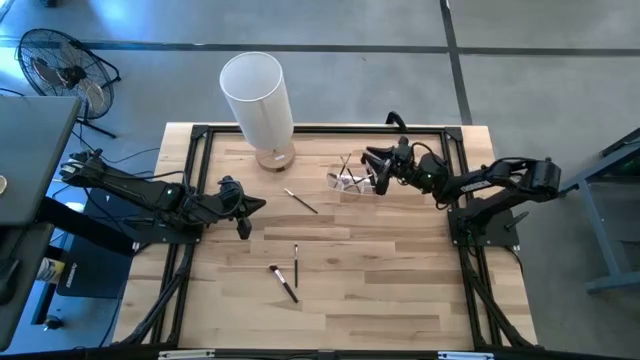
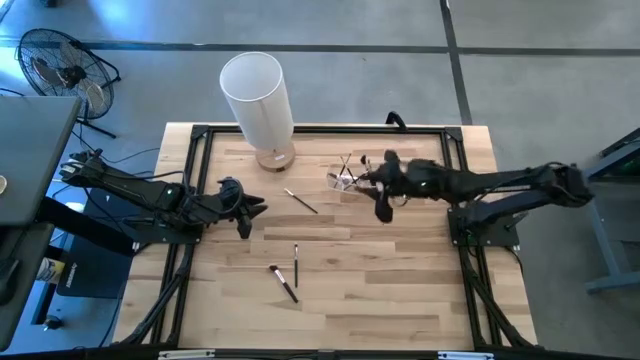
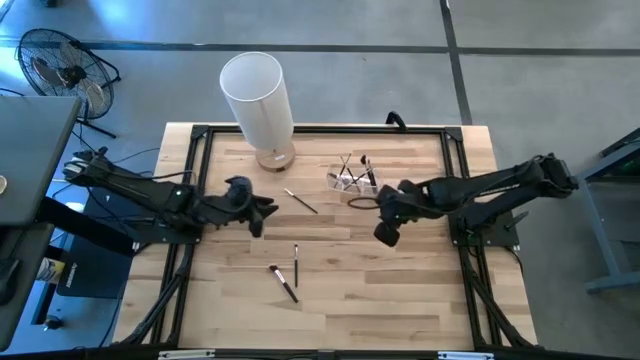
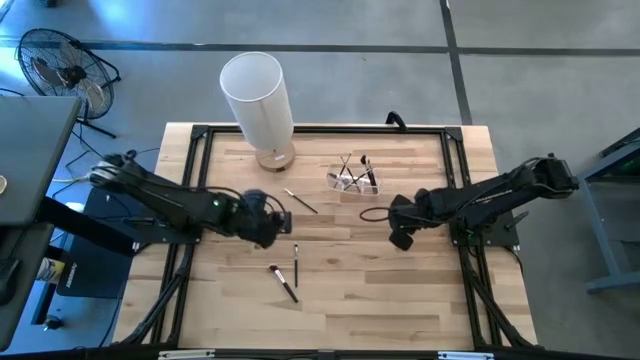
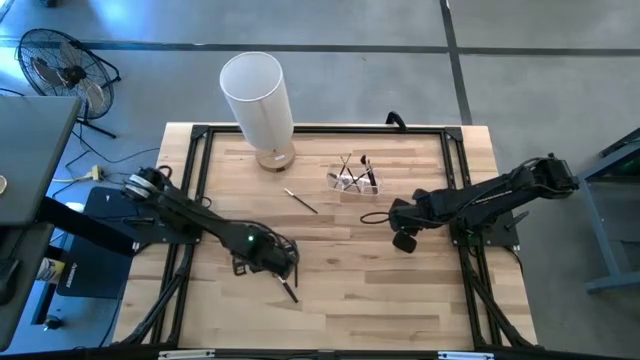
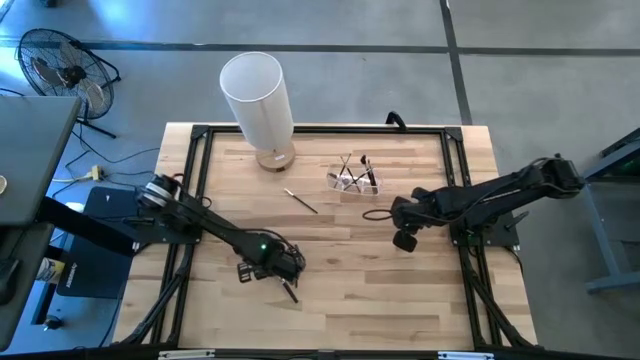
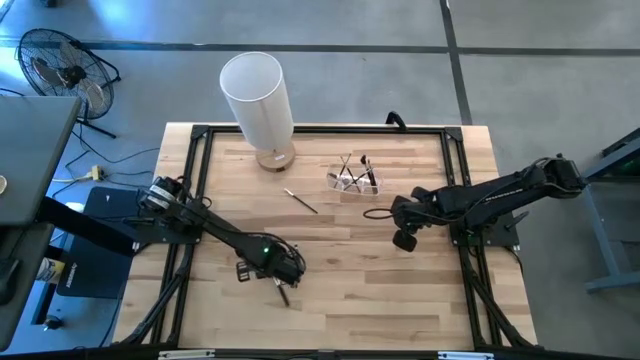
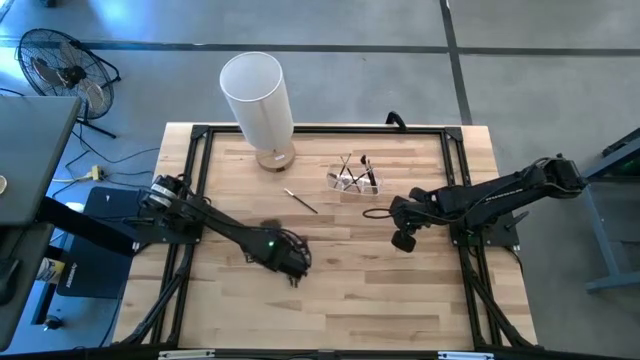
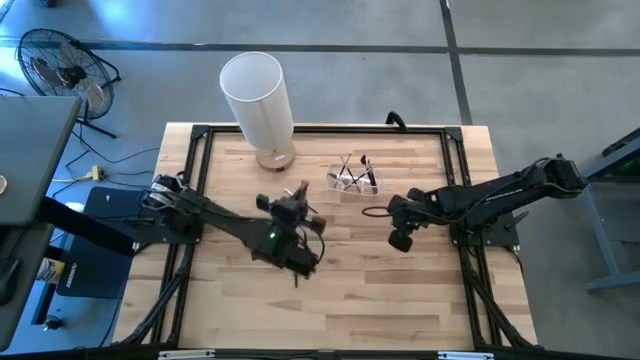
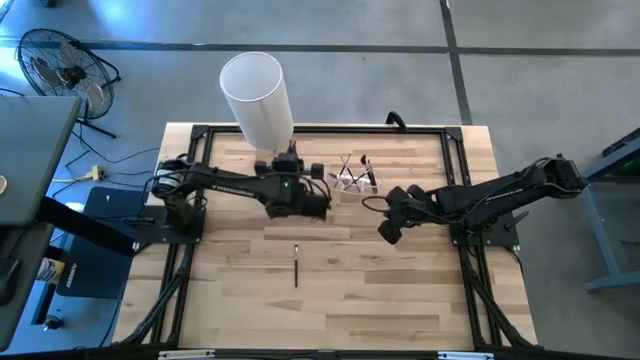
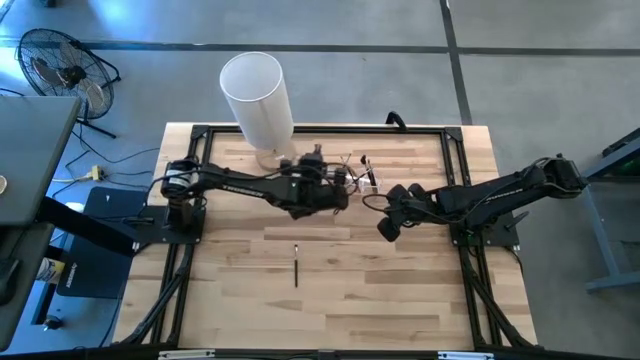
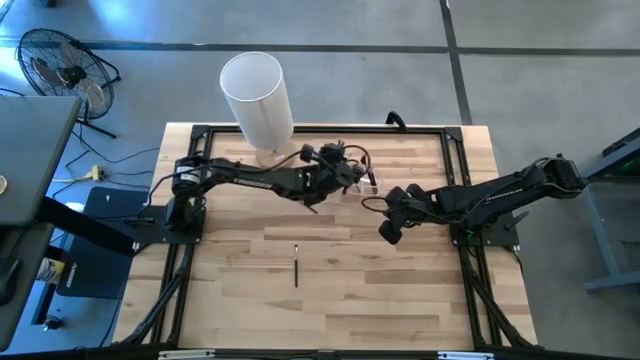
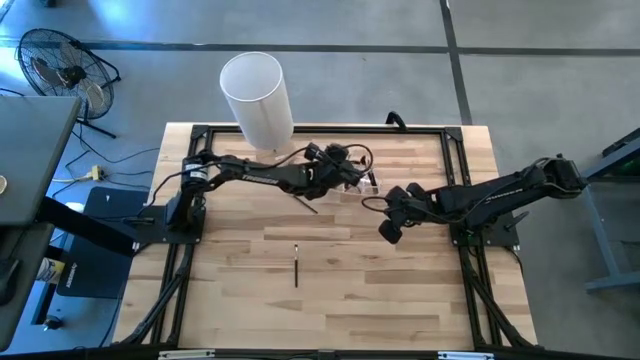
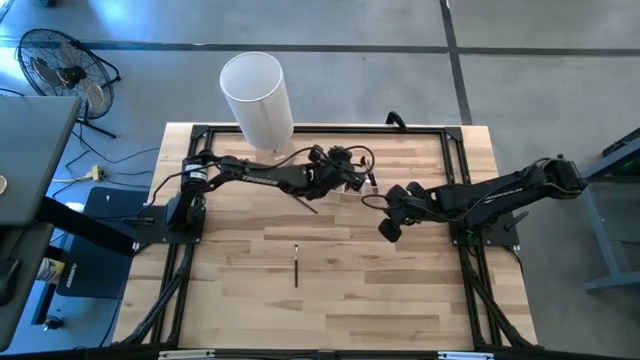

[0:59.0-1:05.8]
Task: Put items in baskets/containers
Put the black powder brush into the transparent organizer

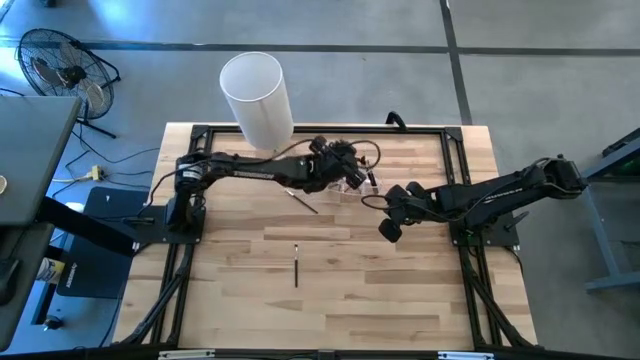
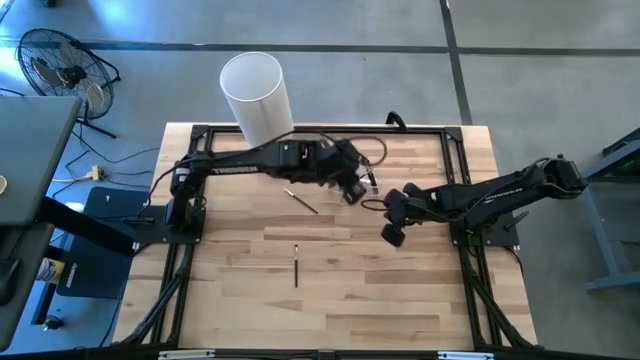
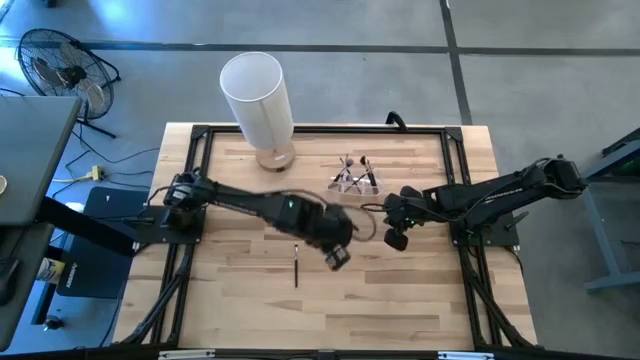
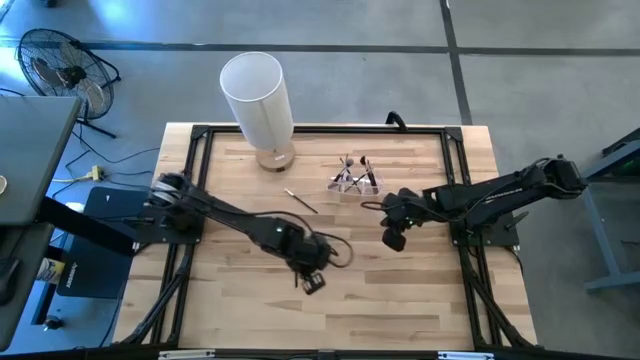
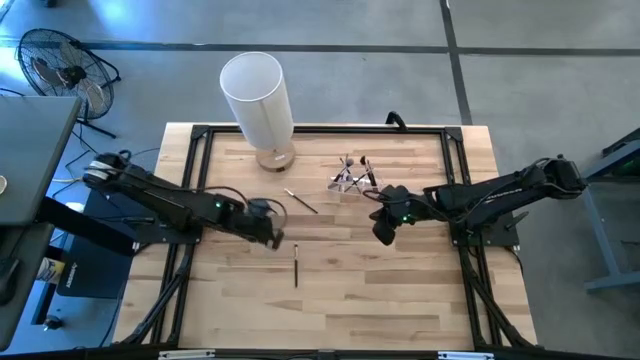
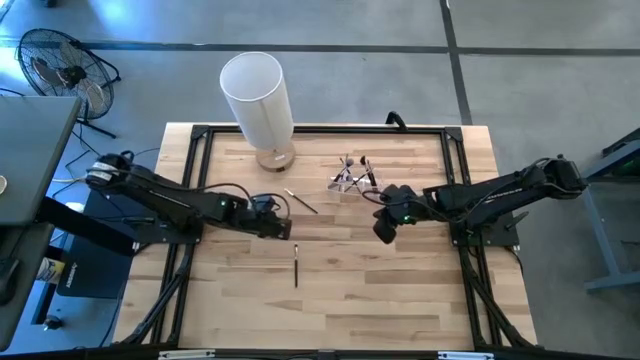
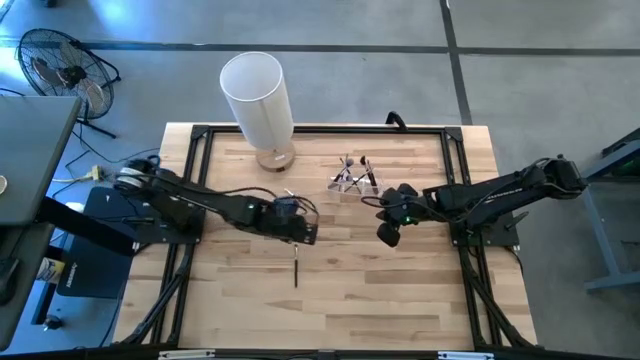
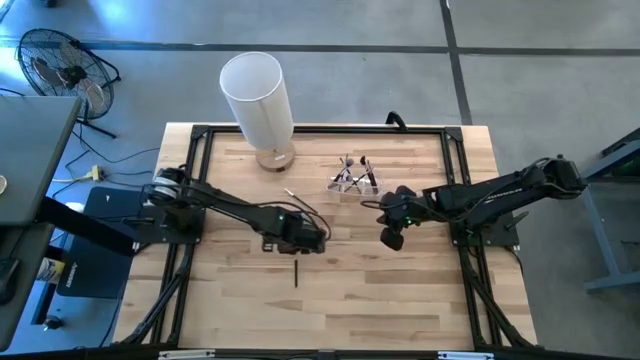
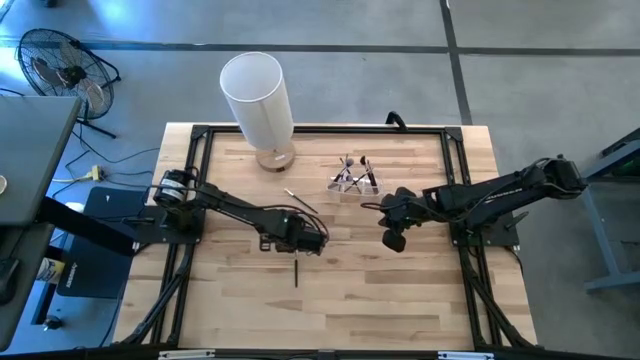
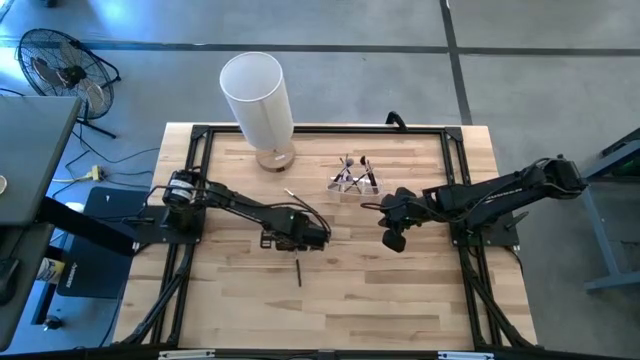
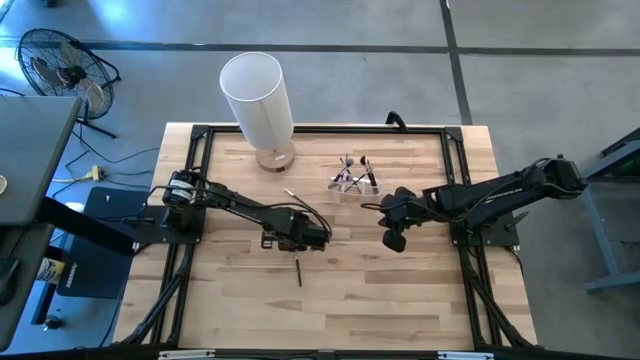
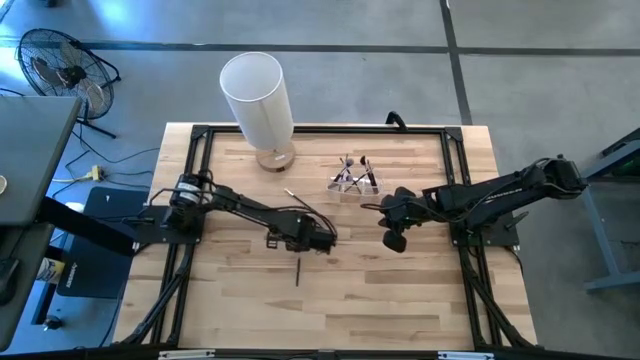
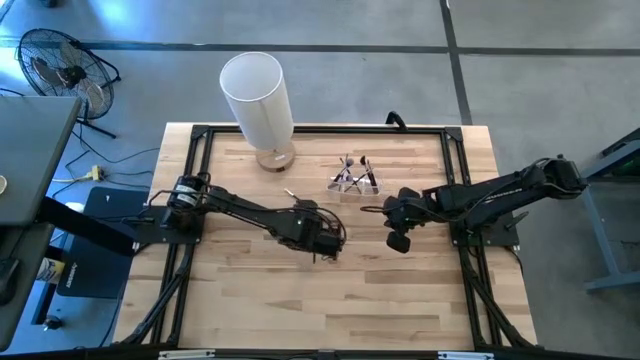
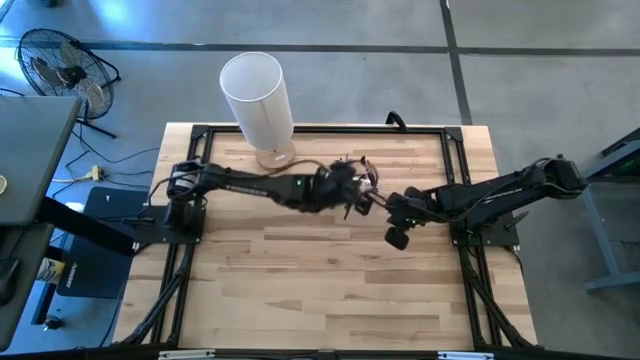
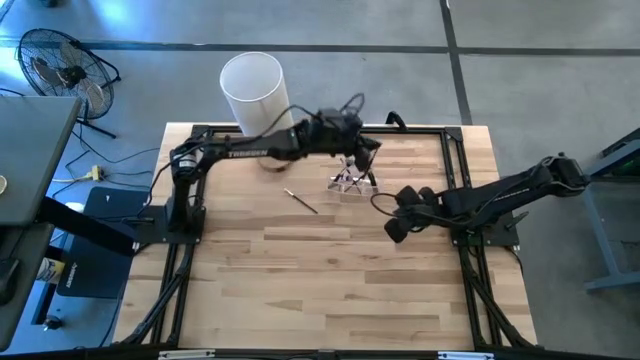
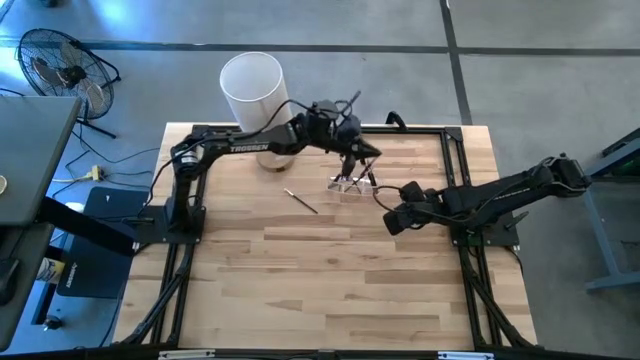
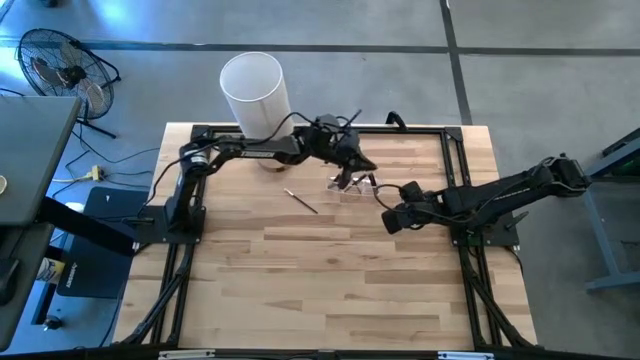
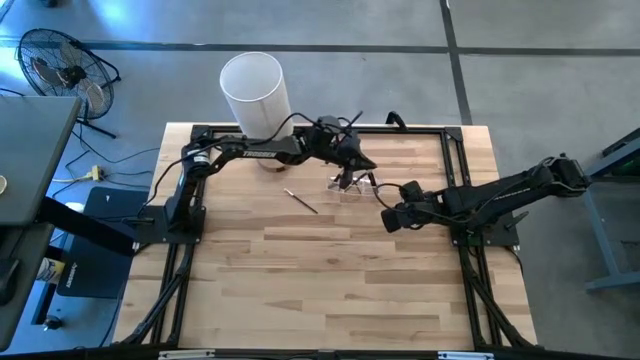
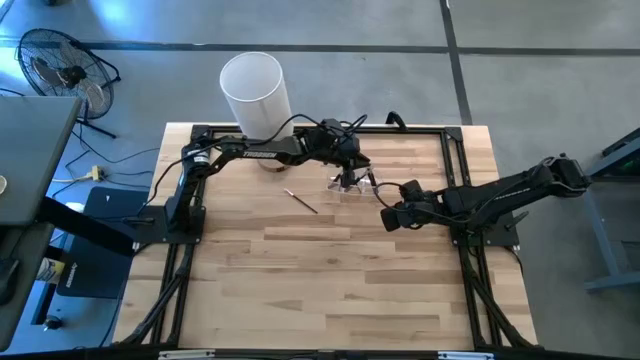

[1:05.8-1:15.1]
Put the black eyeshadow brush into the transparent organizer

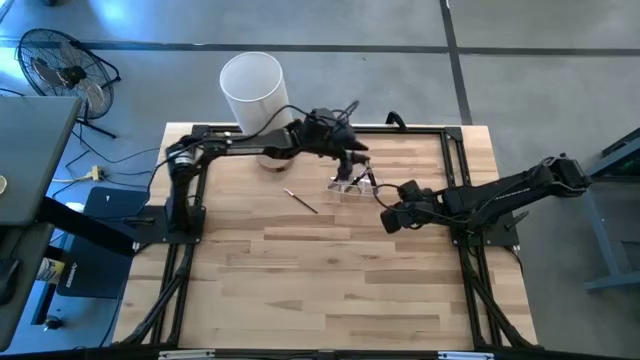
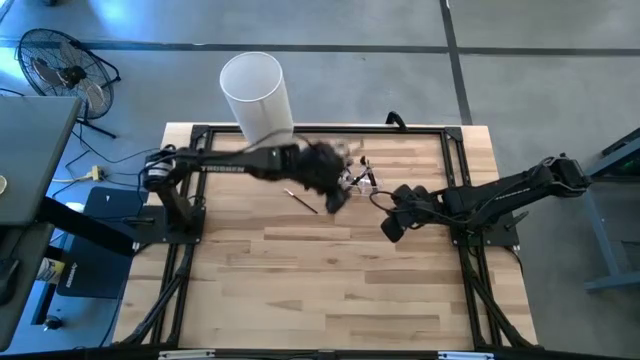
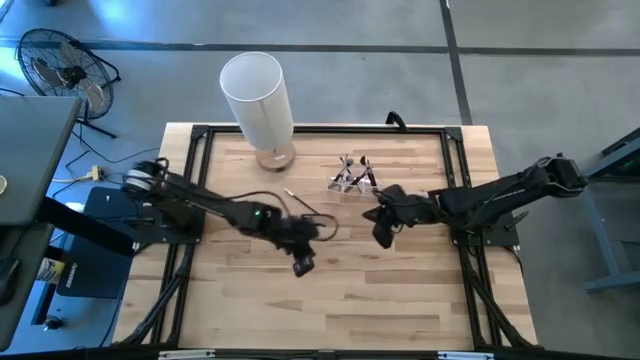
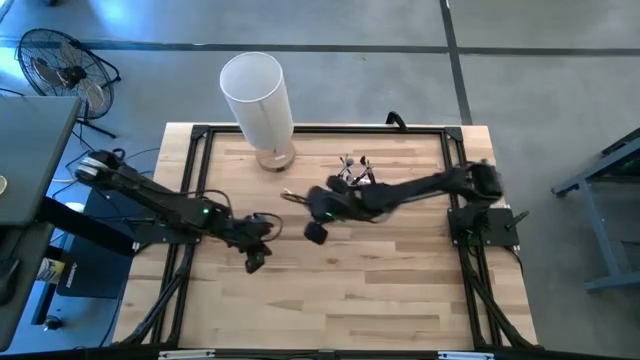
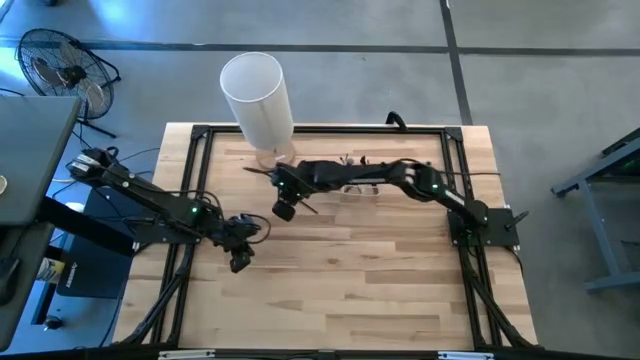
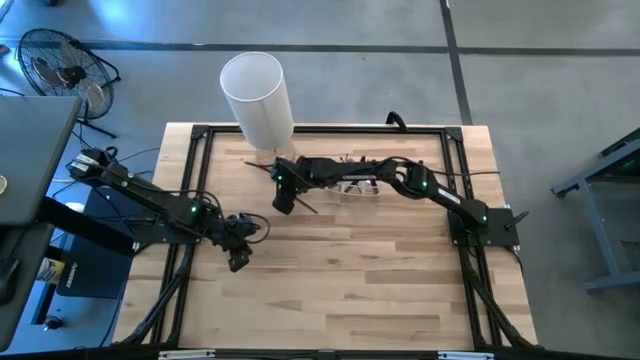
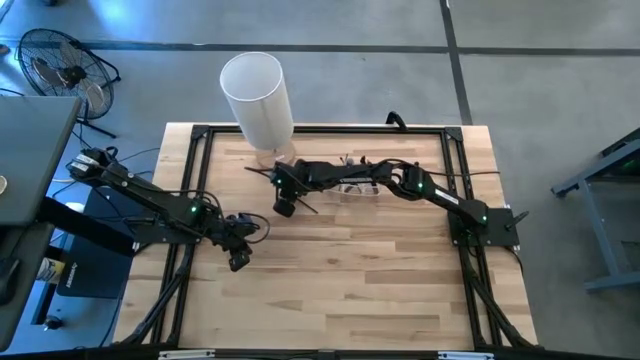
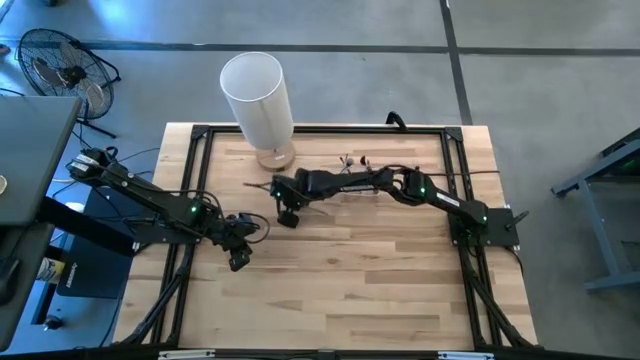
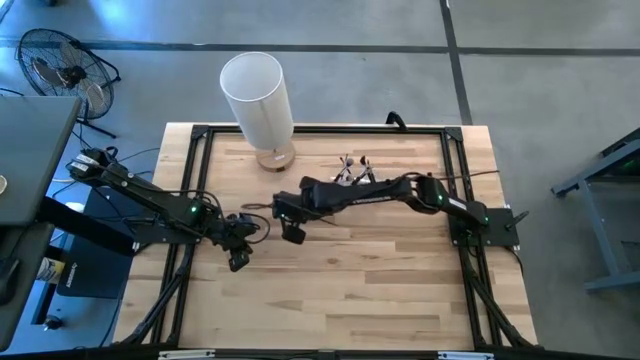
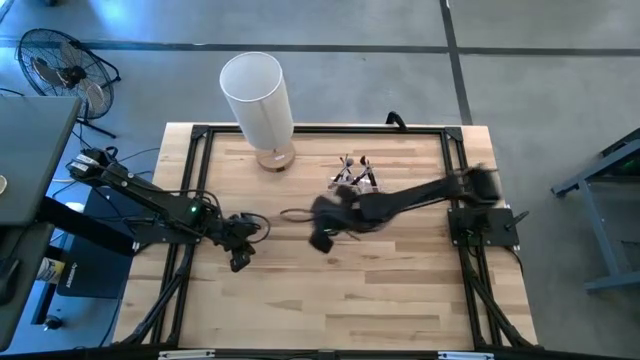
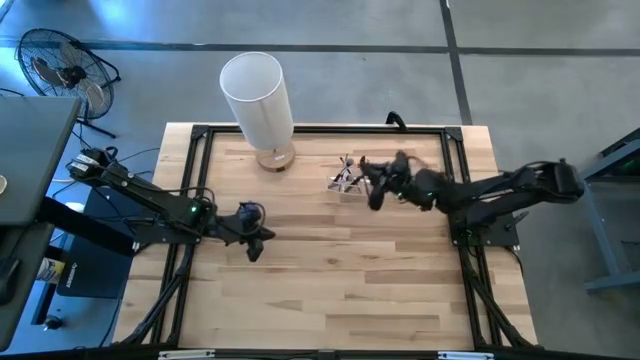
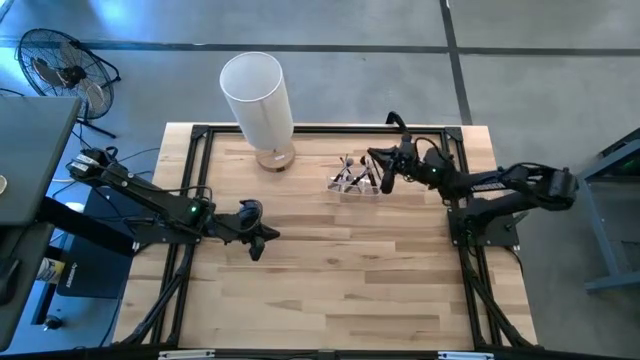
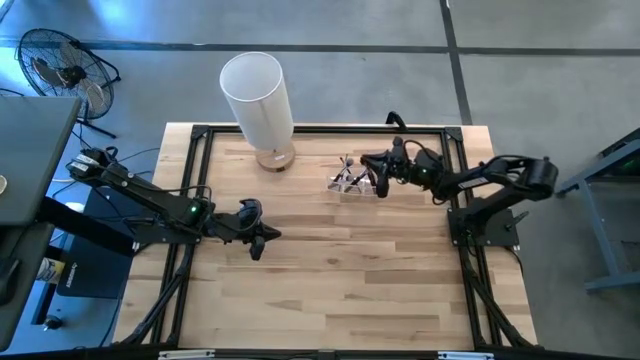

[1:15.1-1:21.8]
Put the black eyeshadow brush into the transparent organizer
